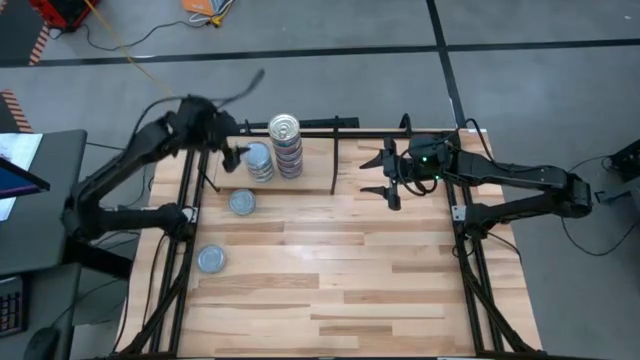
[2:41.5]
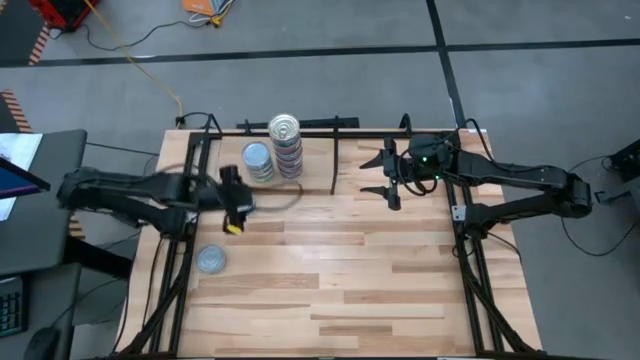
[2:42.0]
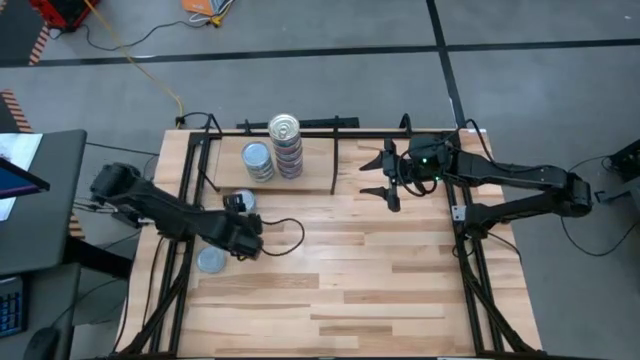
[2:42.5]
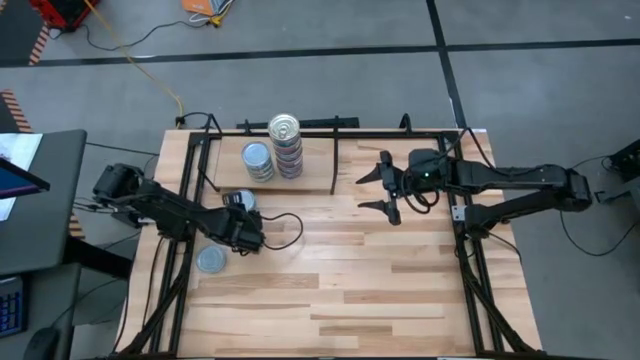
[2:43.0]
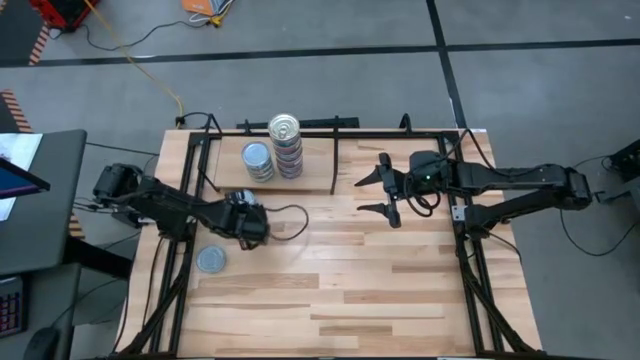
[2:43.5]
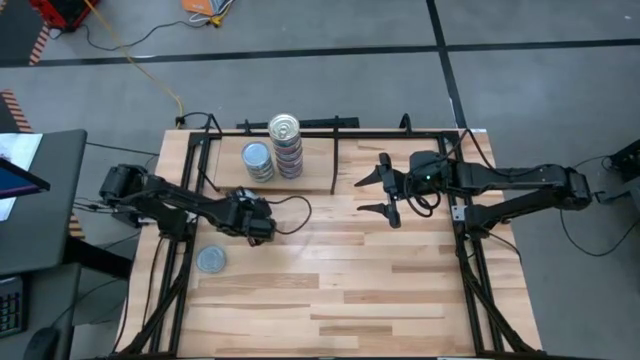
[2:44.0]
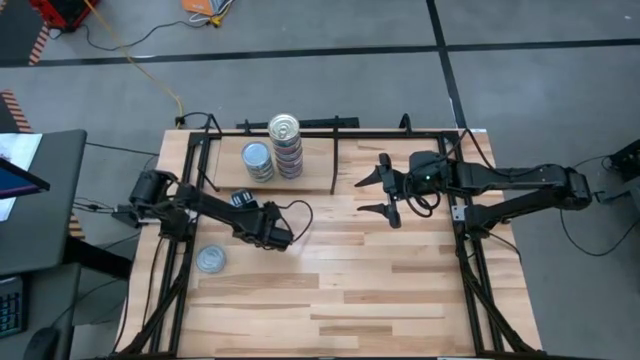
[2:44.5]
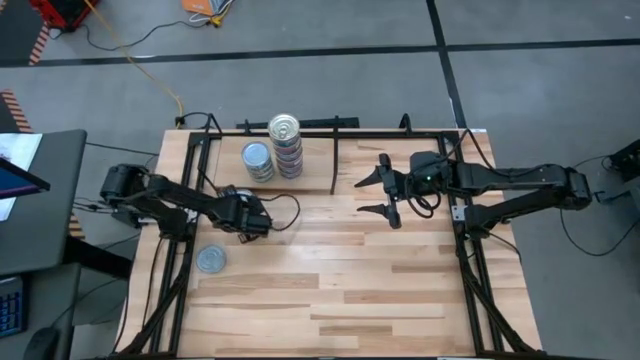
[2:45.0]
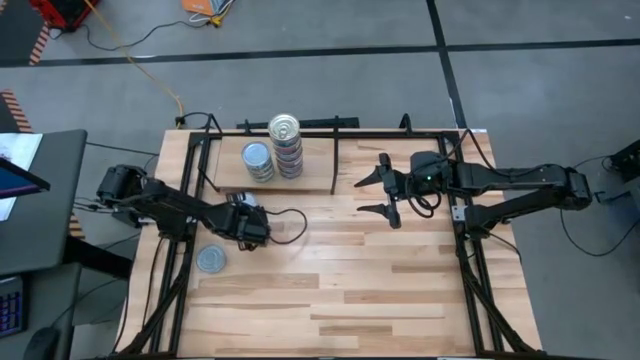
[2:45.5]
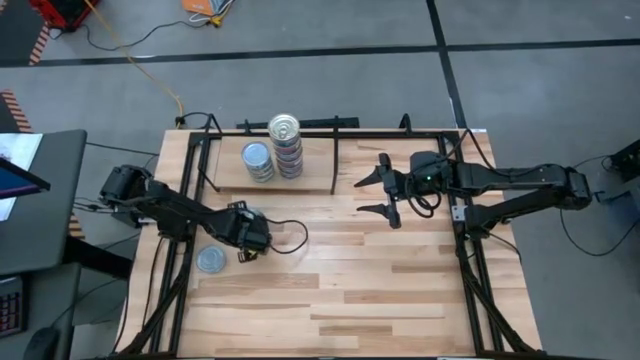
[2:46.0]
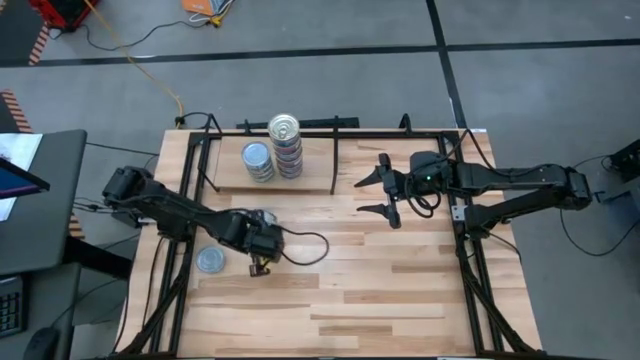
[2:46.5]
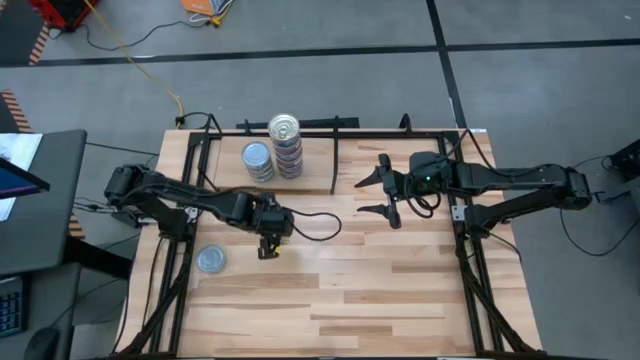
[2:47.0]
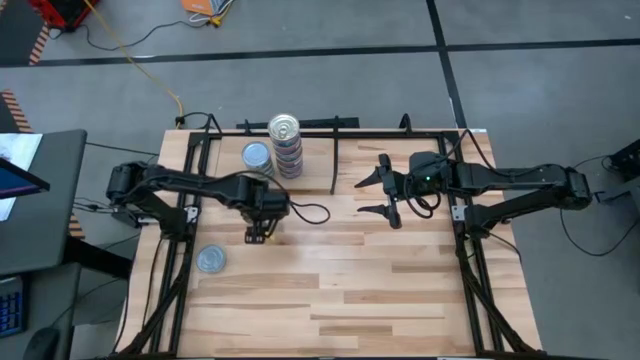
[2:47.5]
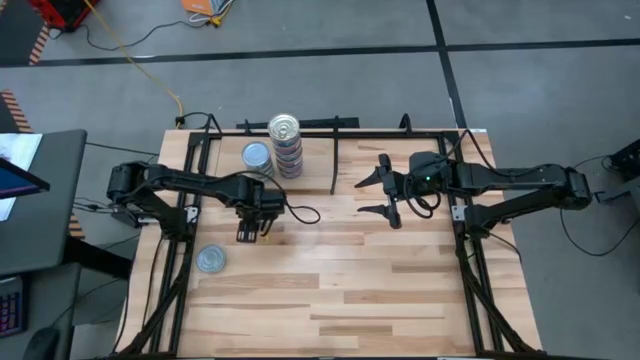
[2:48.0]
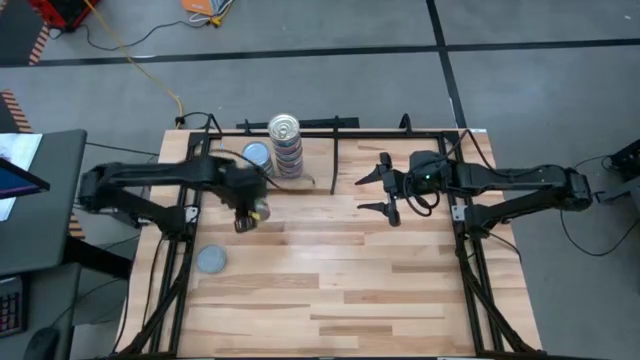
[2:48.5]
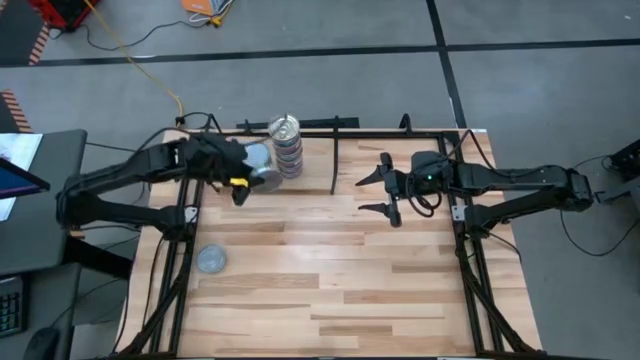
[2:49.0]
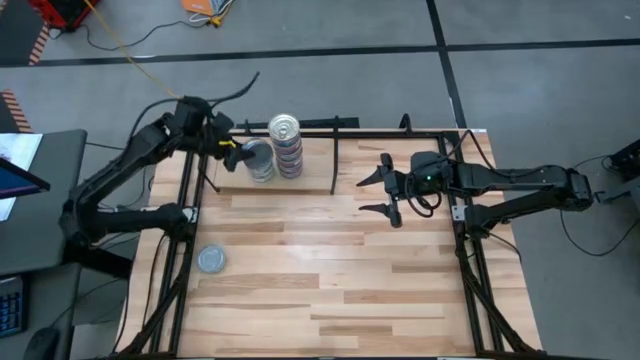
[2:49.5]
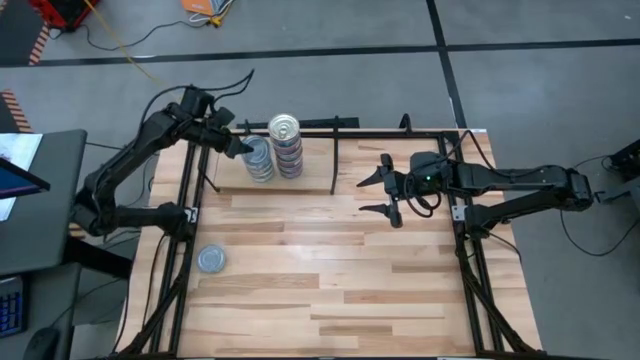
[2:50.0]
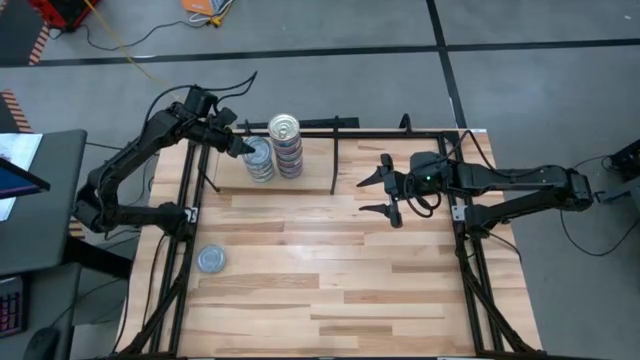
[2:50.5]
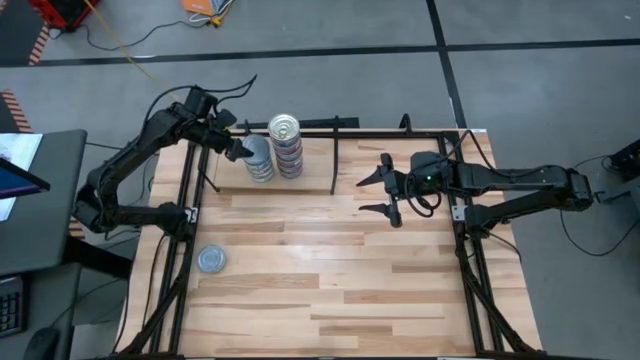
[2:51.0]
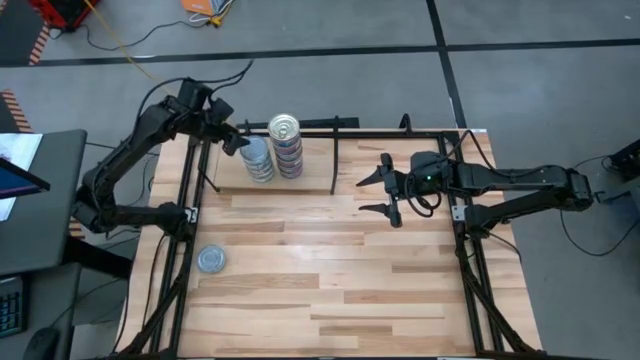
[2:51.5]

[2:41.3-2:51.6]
Task: Stack canned seafood by type on shelf
Stack the green tuna can on top of the green tuna cans on the shelf

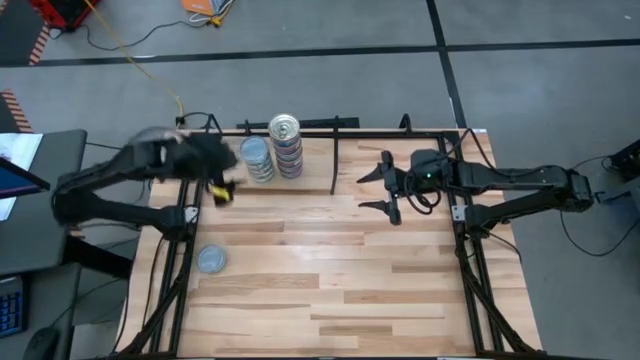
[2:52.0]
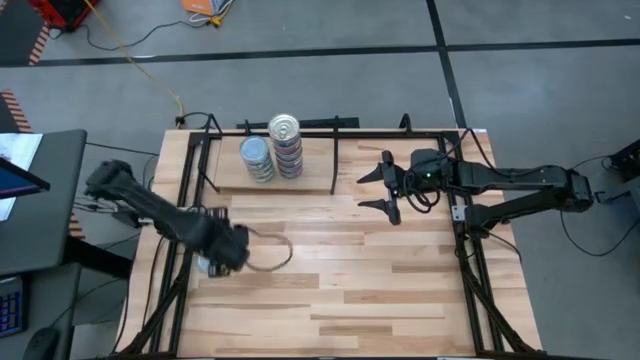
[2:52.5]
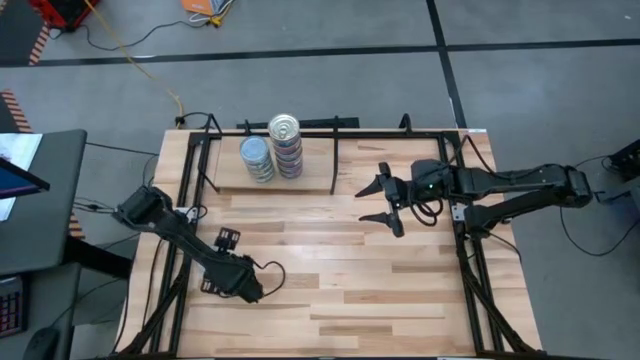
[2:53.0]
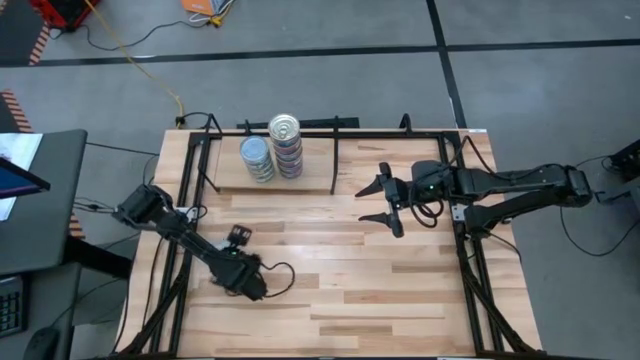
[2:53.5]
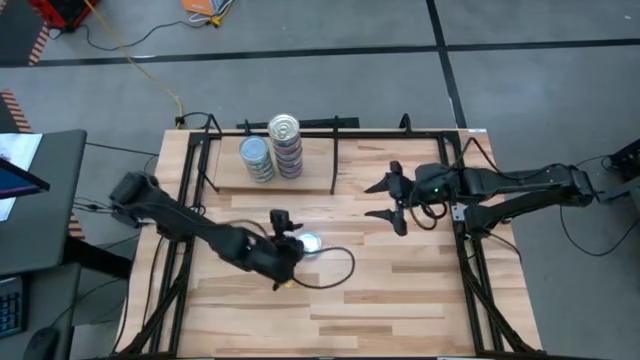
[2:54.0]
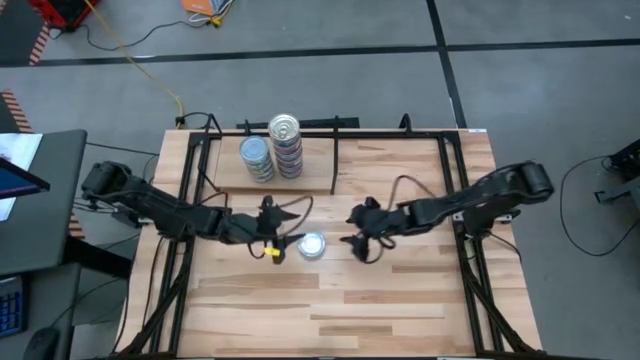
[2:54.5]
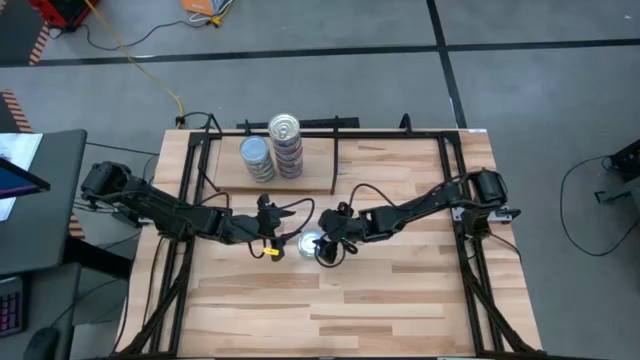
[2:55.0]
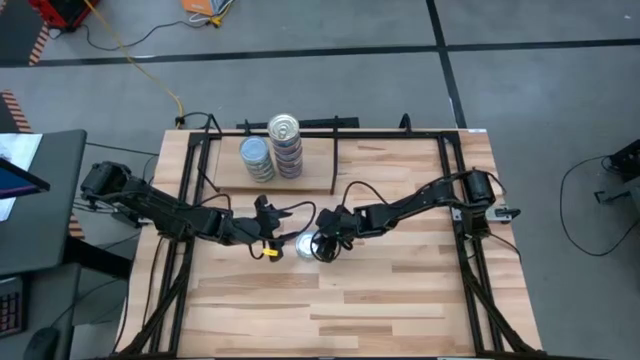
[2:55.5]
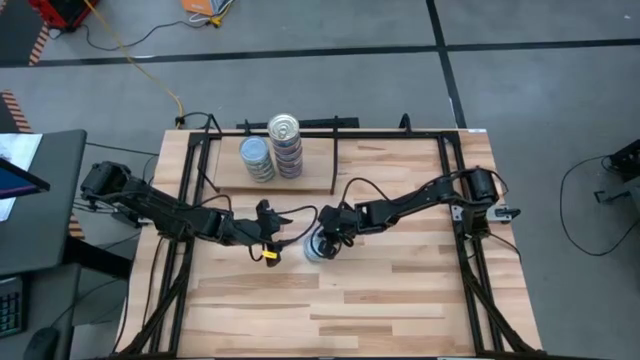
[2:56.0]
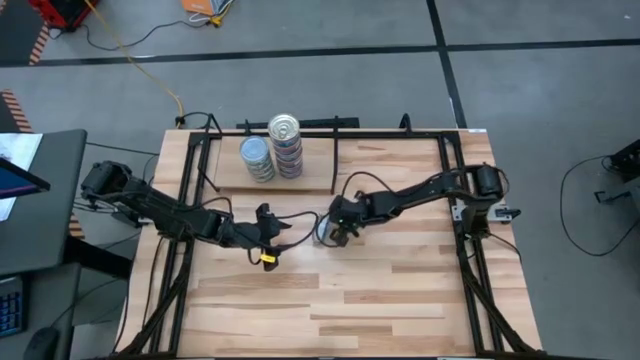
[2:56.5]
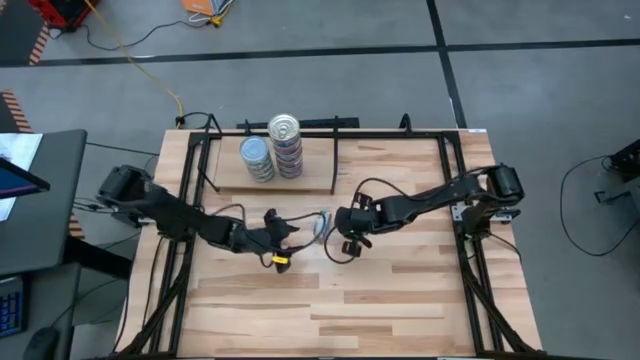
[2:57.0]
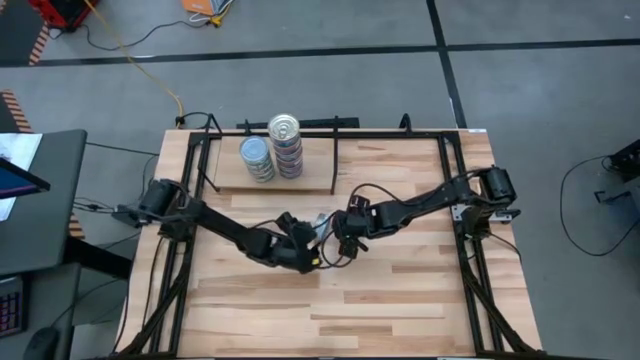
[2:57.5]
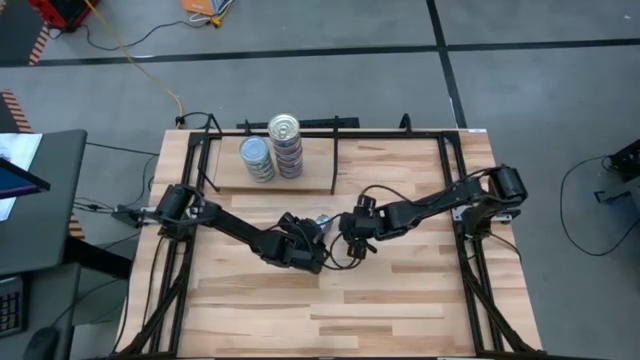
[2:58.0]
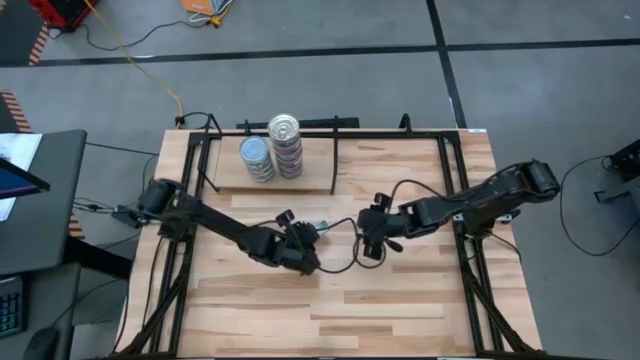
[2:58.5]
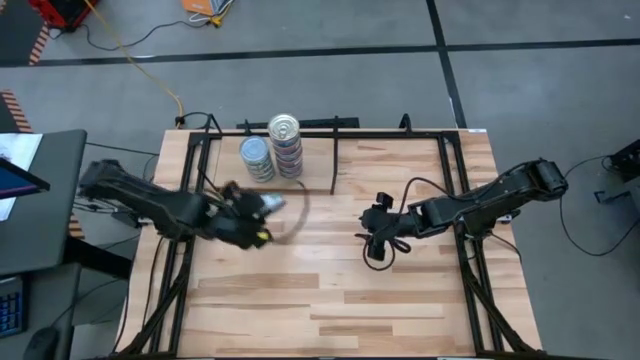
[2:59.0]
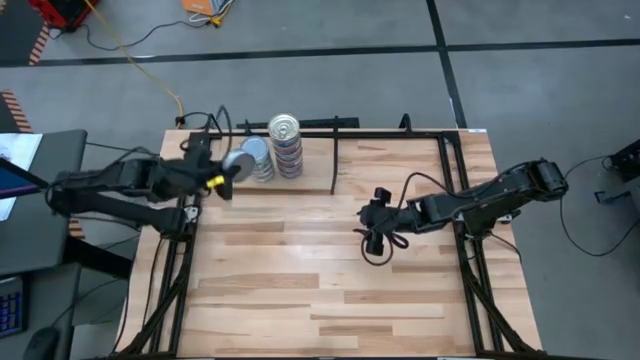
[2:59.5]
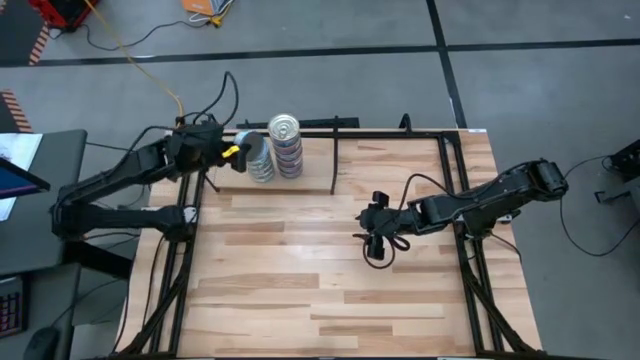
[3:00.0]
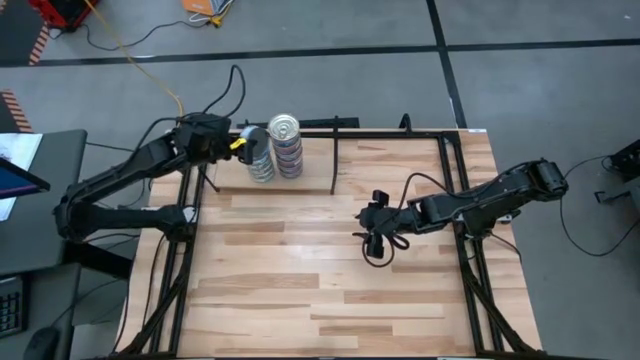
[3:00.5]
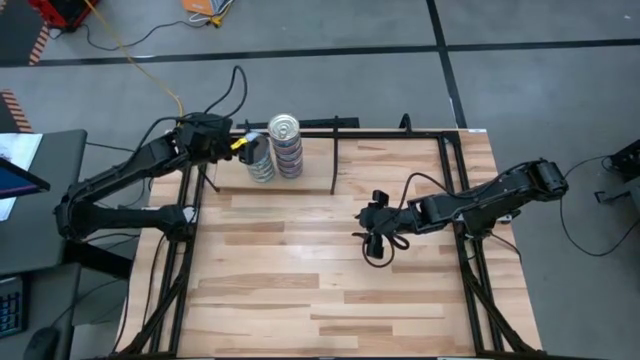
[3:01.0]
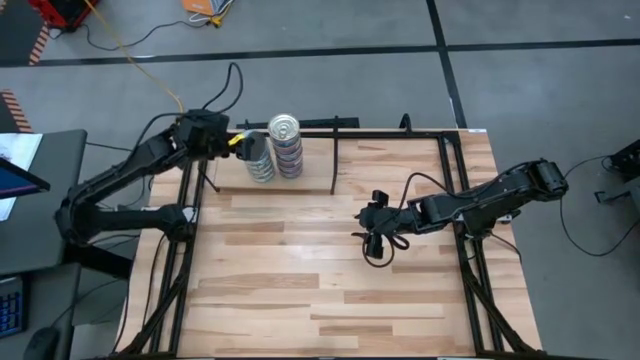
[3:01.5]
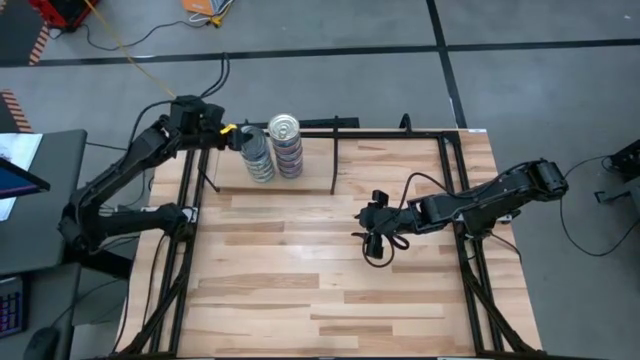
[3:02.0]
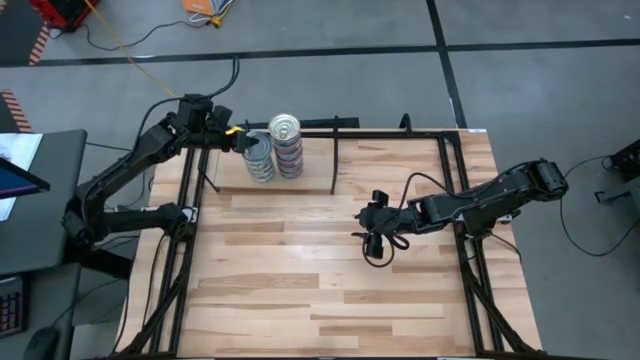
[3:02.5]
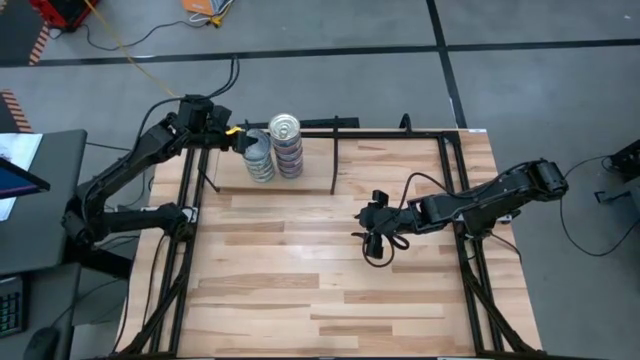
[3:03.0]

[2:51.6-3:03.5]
Stack the green tuna can on top of the green tuna cans on the shelf
